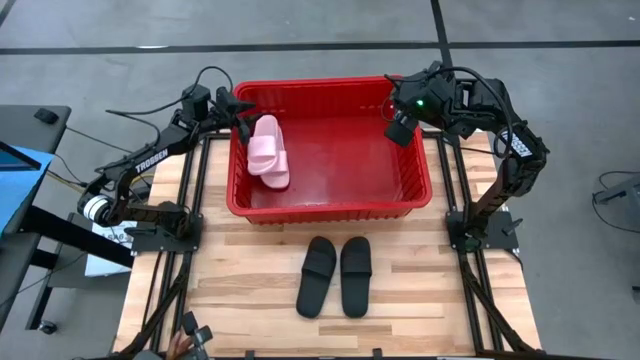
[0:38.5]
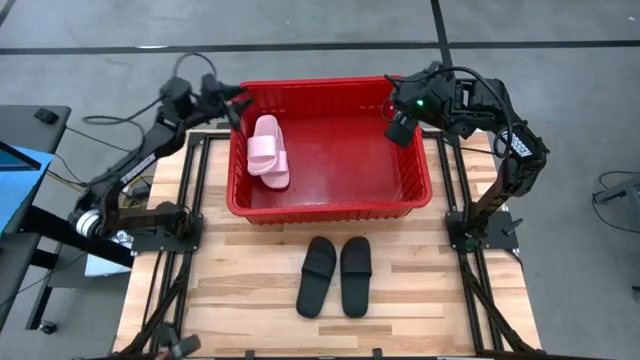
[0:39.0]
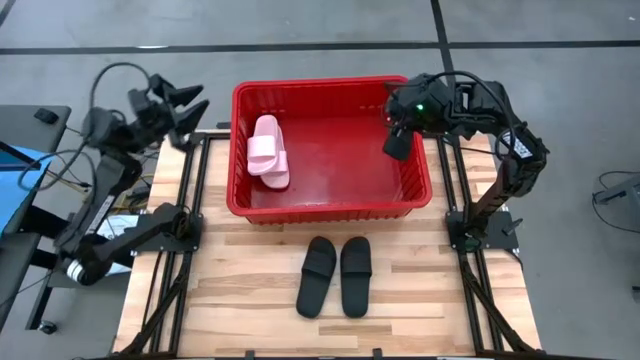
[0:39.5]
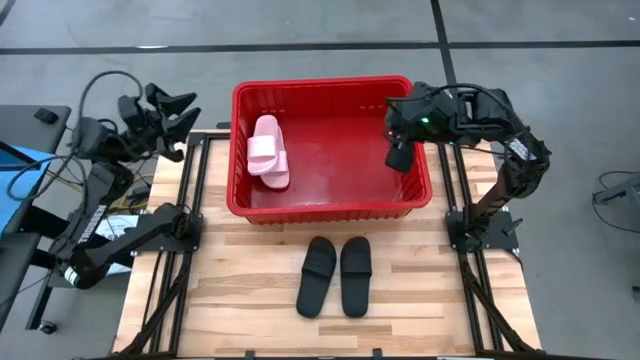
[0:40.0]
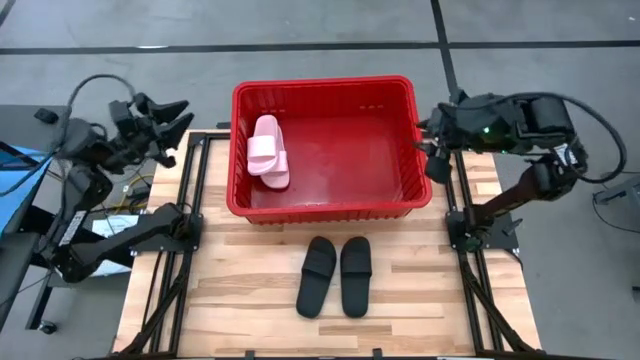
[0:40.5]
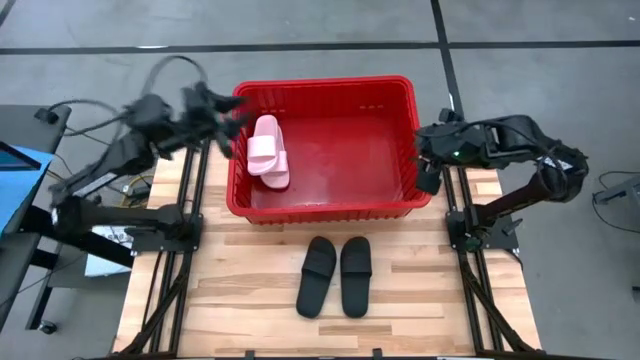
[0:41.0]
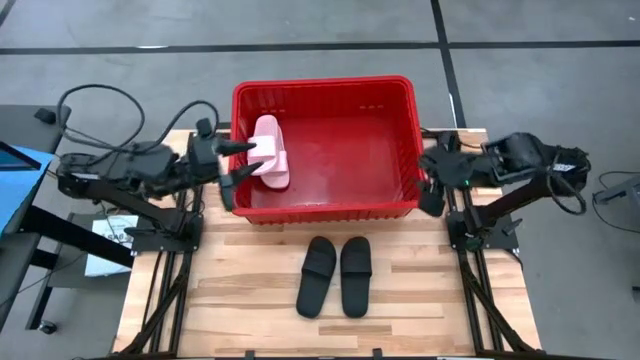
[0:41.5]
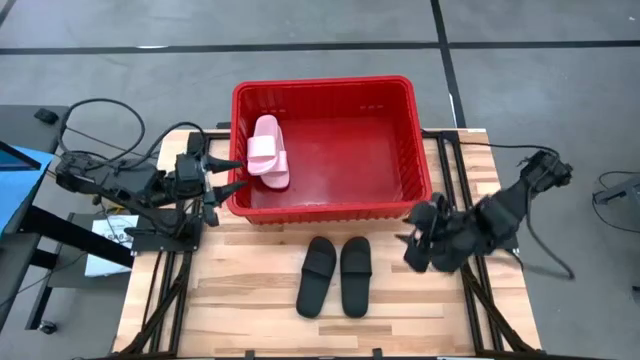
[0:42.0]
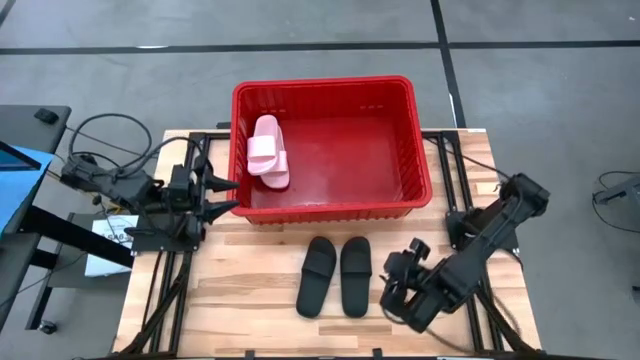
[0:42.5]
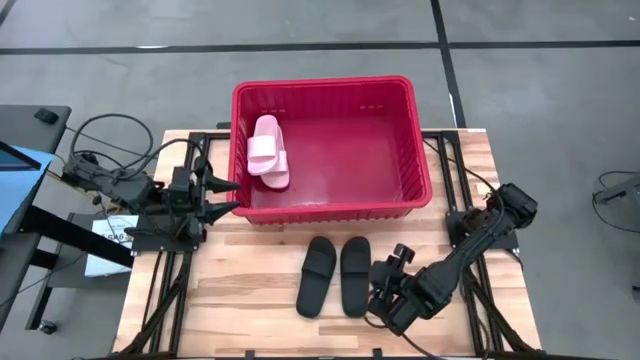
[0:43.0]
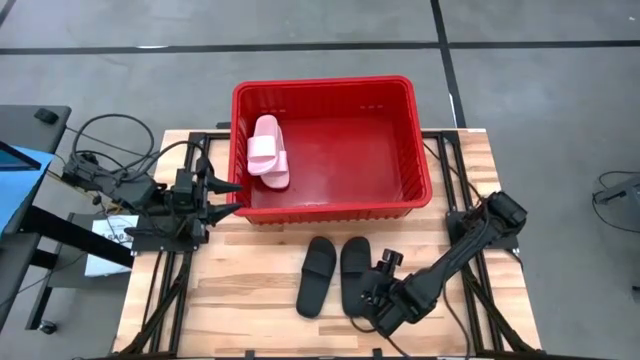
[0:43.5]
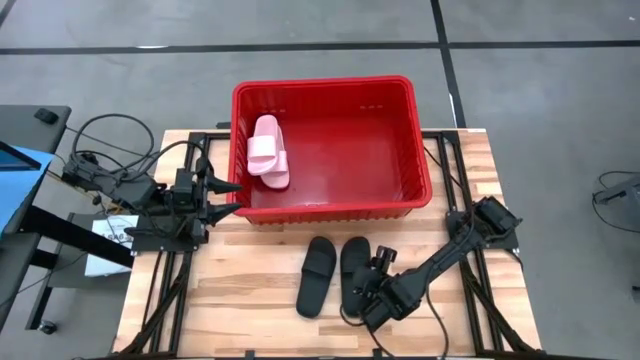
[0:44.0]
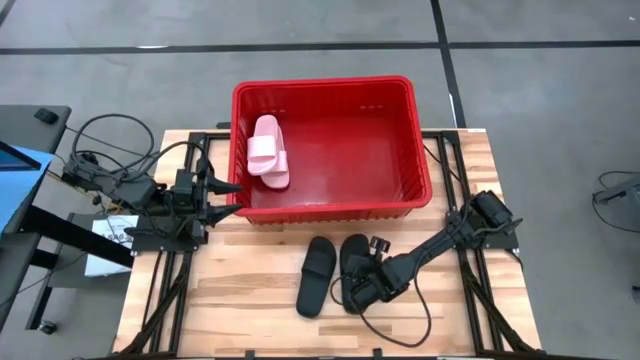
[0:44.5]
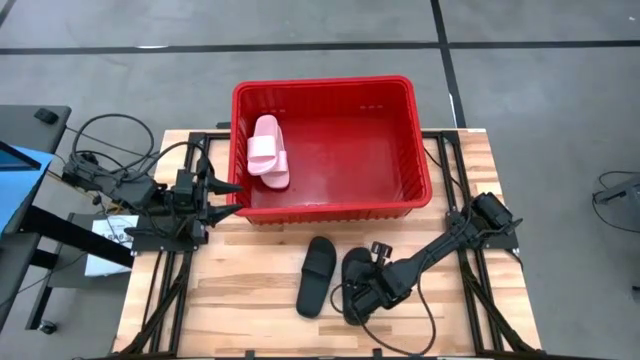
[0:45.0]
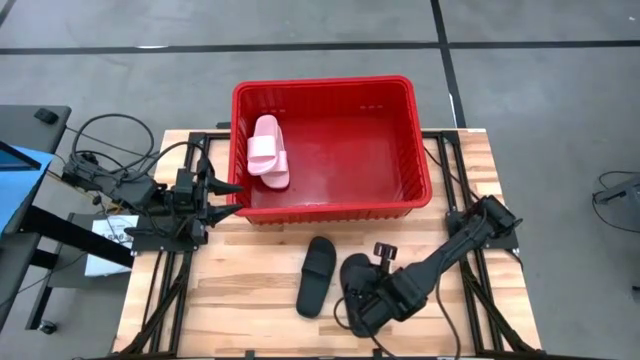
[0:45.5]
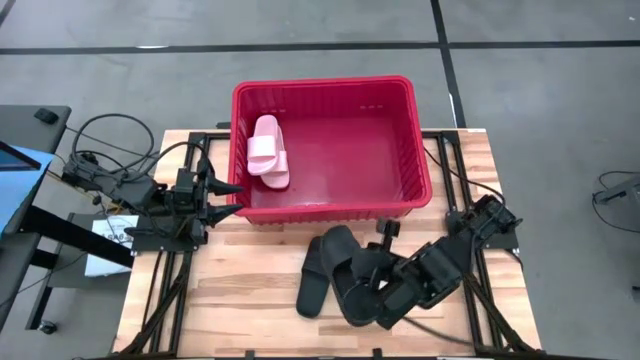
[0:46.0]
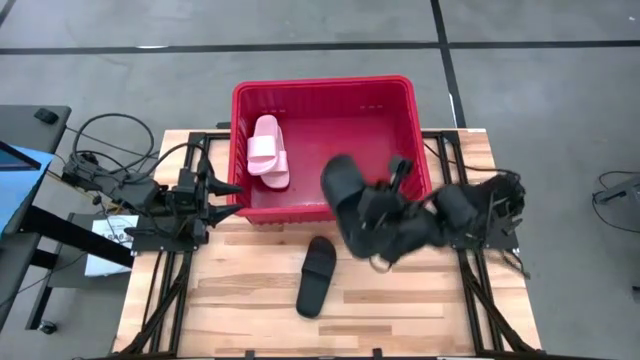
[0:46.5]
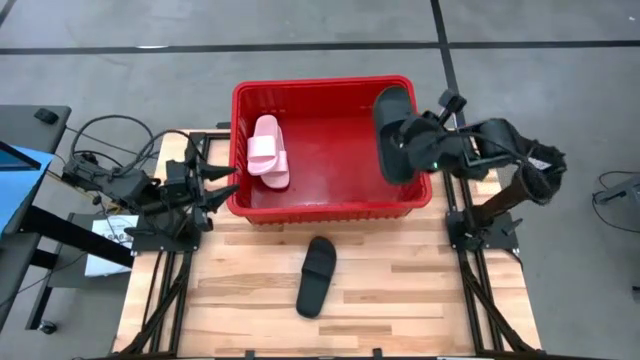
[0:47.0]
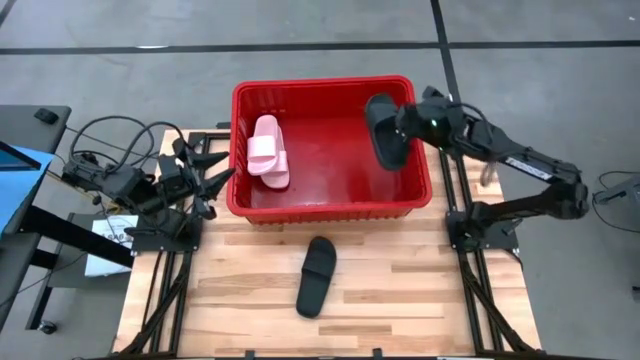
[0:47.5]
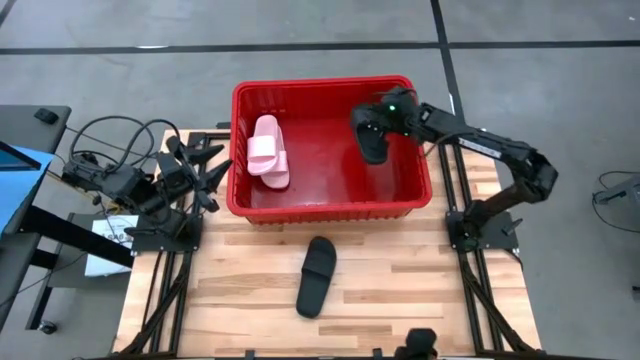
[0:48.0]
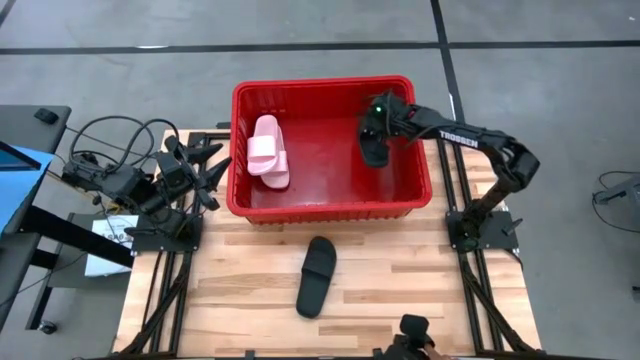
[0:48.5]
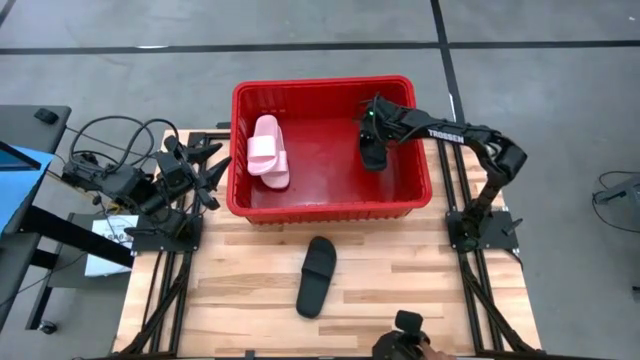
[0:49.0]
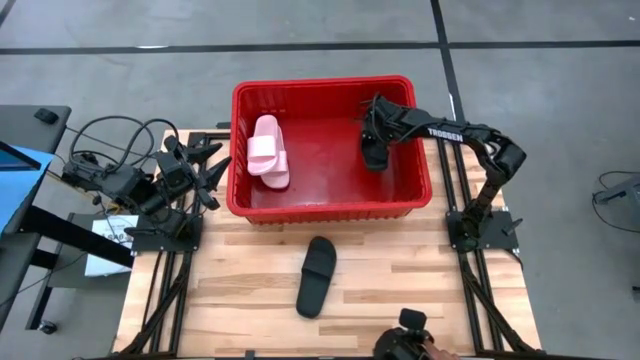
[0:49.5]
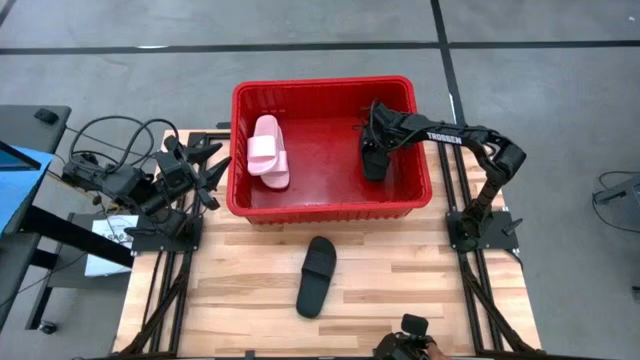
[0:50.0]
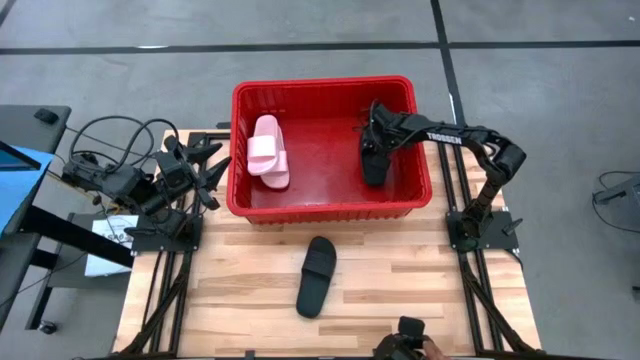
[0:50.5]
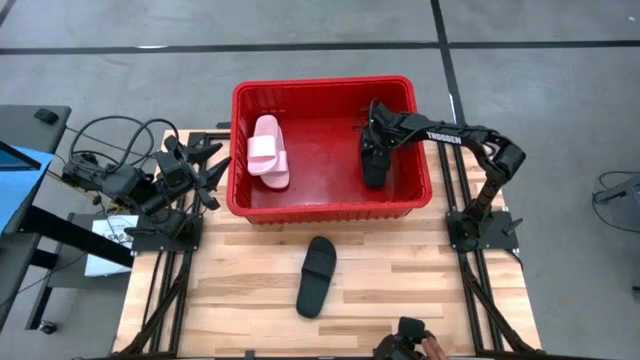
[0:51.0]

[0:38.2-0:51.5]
Task: Pick and place slides into bin
Put the right black slipper in the red bin

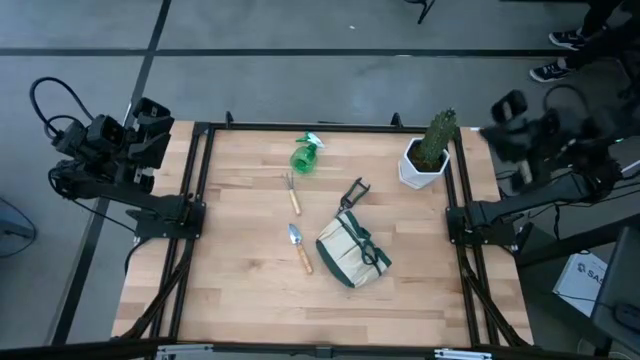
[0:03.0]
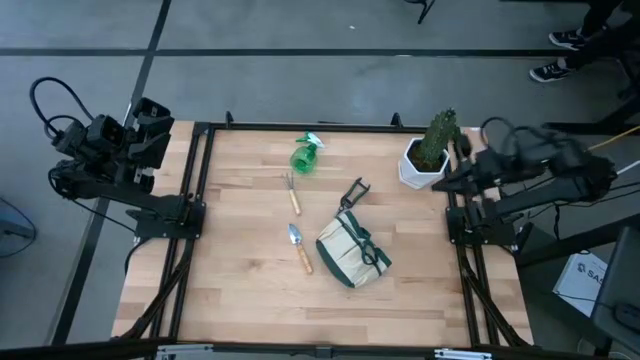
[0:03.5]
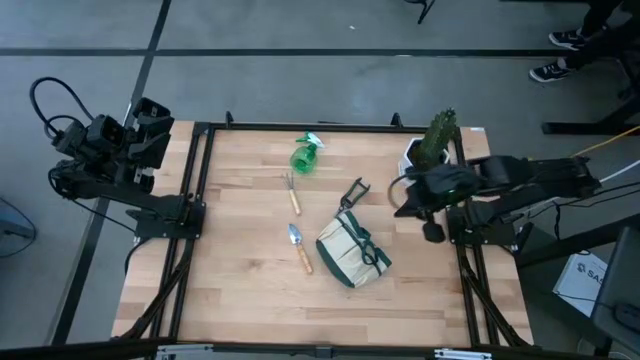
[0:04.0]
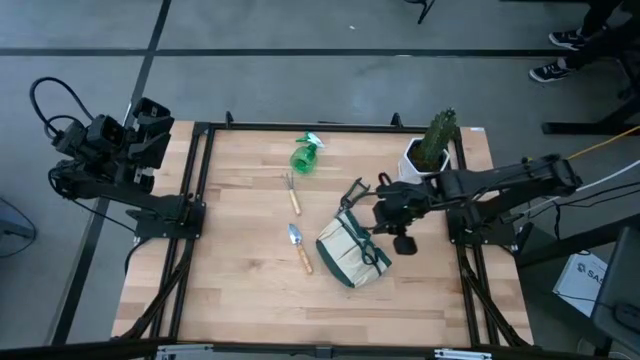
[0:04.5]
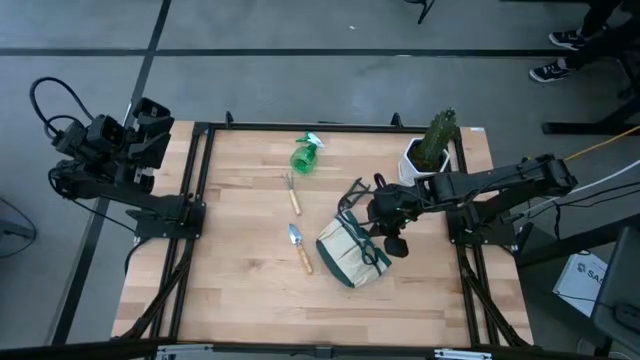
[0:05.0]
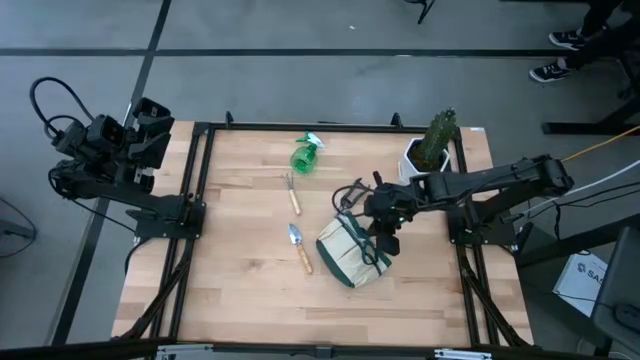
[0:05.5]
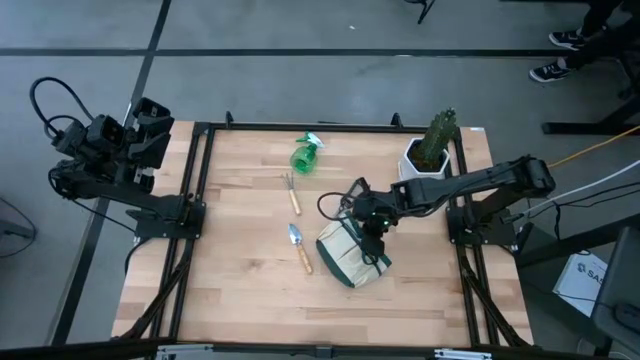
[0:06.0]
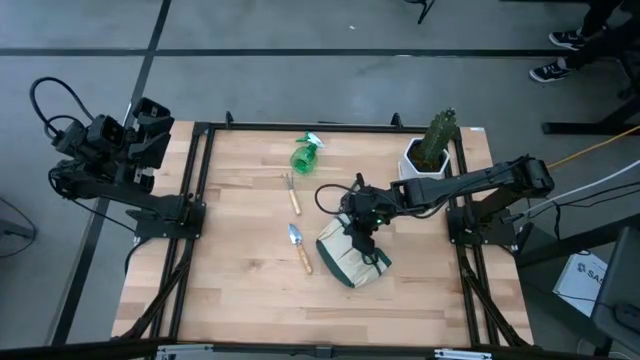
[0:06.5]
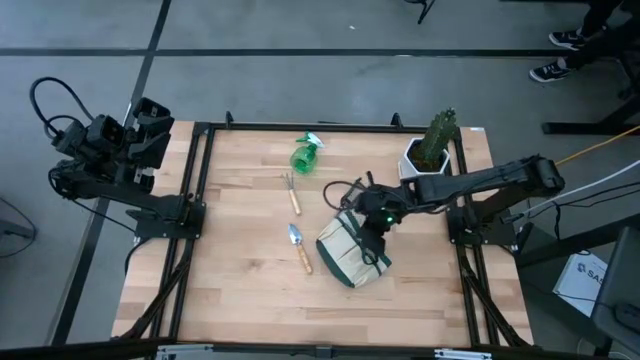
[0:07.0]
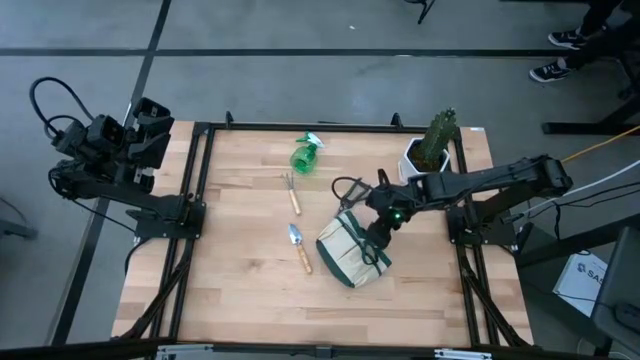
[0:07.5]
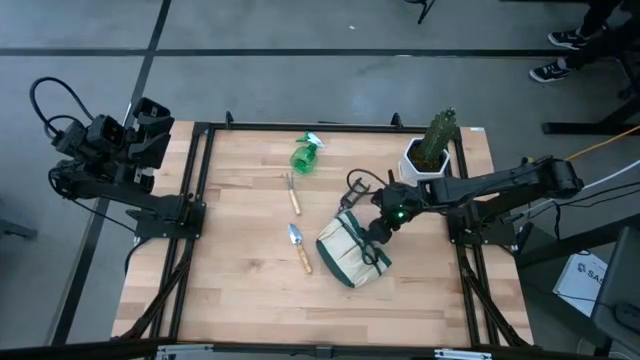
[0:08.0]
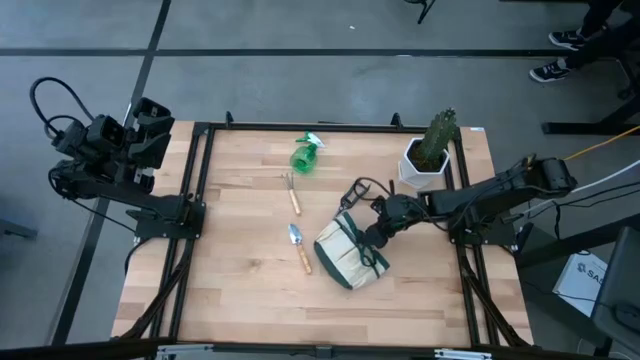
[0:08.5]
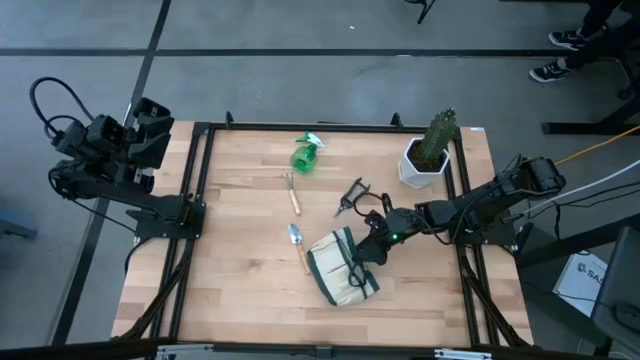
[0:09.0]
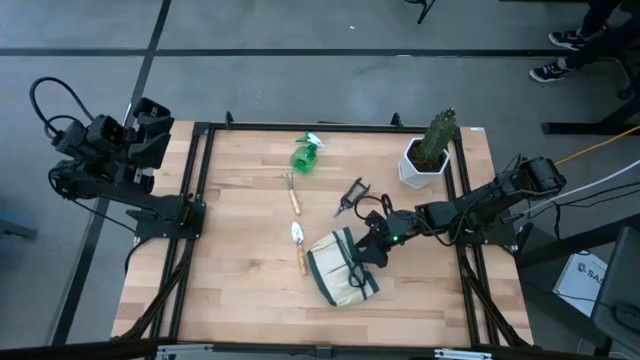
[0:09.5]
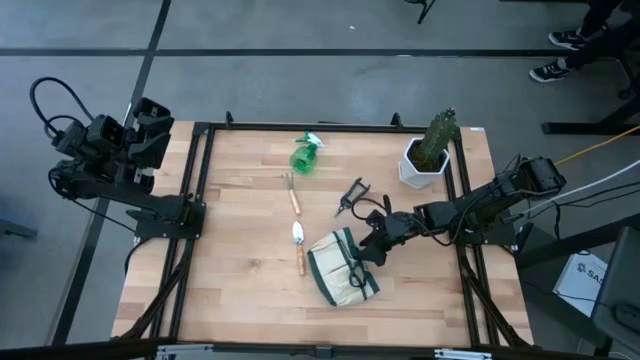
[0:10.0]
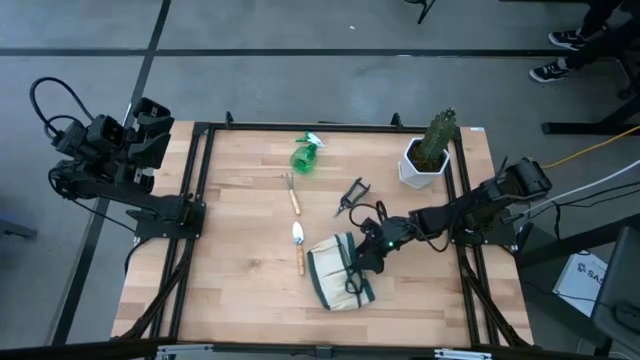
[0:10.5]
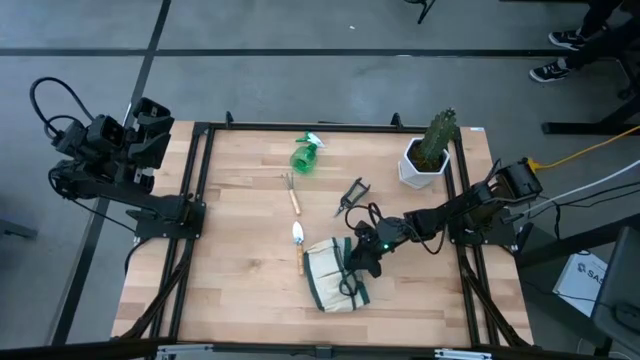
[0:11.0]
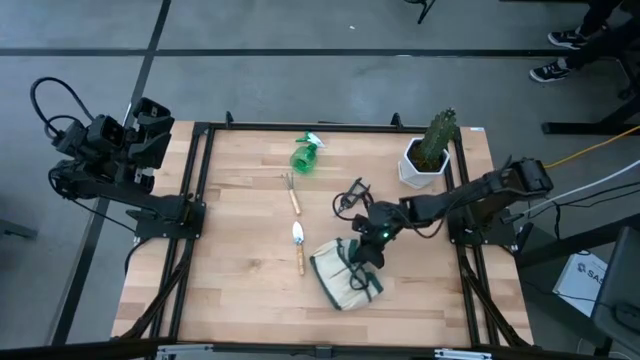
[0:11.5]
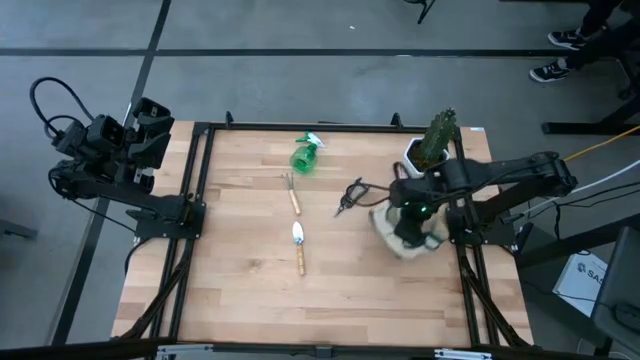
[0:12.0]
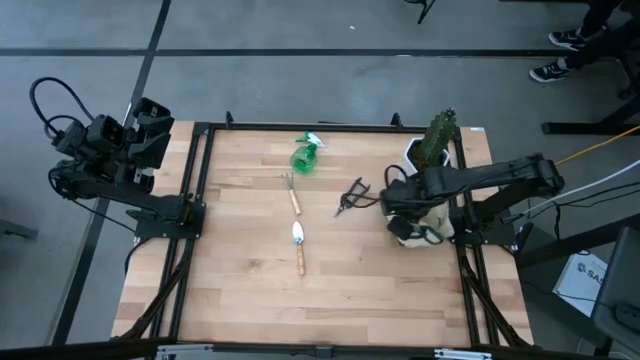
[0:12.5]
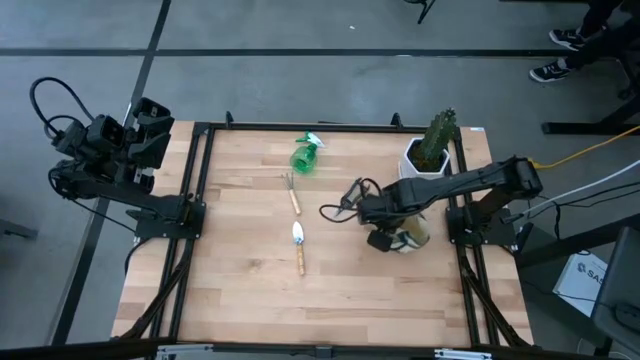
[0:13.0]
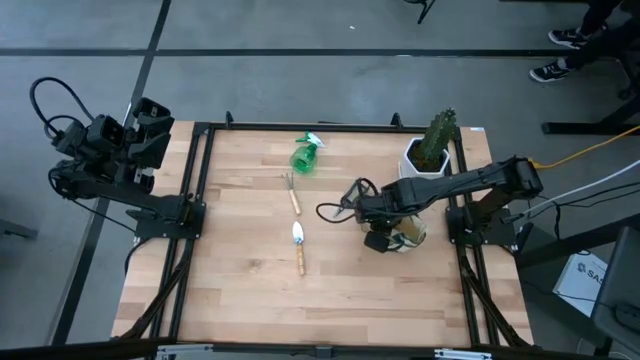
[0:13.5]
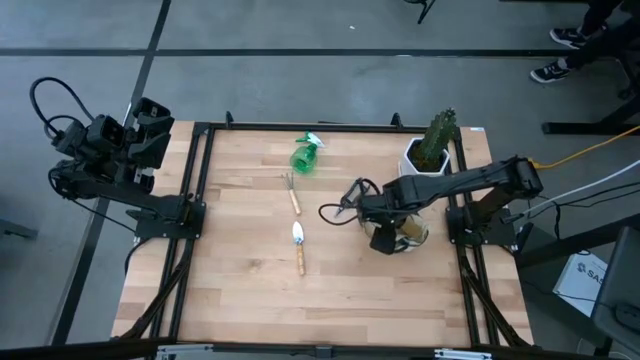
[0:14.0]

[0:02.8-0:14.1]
Task: Pick & Place Garden tools in Gardening bag
Prepare the light brown gardening bag
